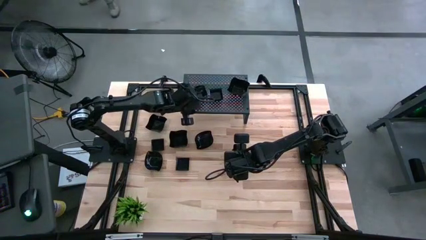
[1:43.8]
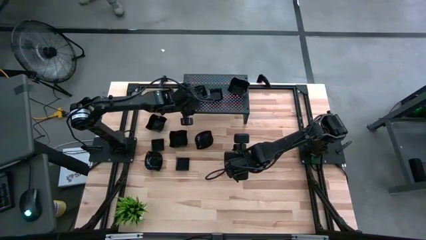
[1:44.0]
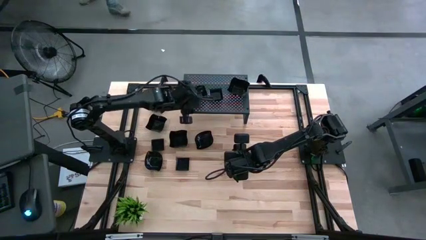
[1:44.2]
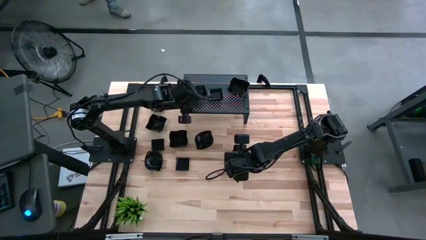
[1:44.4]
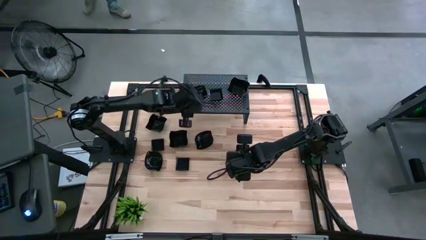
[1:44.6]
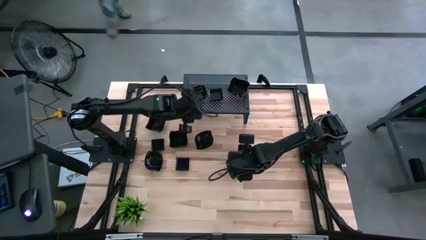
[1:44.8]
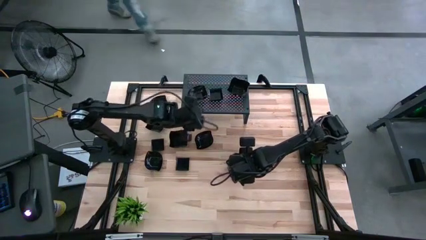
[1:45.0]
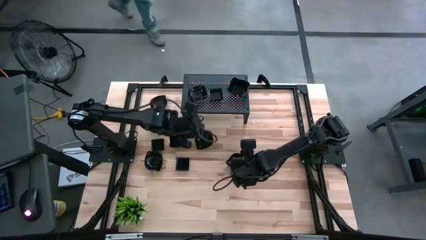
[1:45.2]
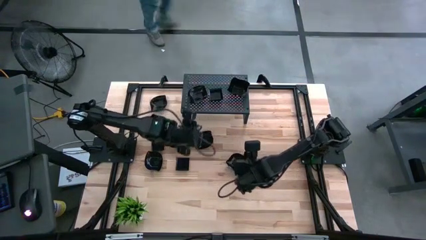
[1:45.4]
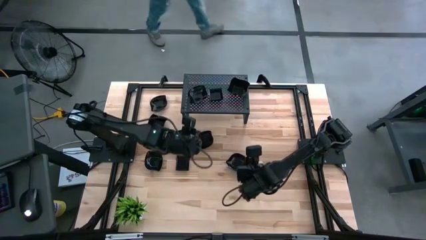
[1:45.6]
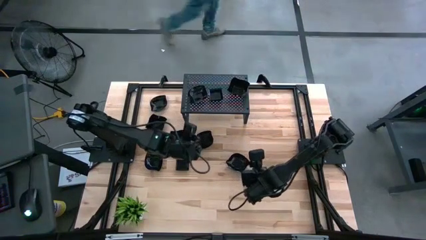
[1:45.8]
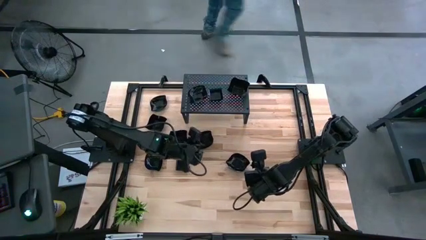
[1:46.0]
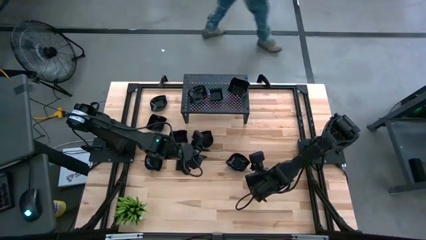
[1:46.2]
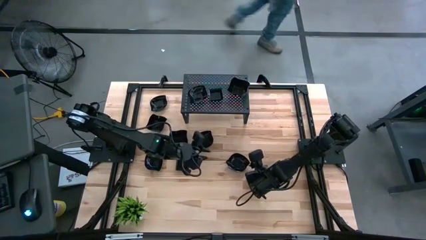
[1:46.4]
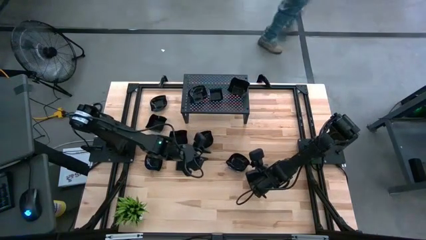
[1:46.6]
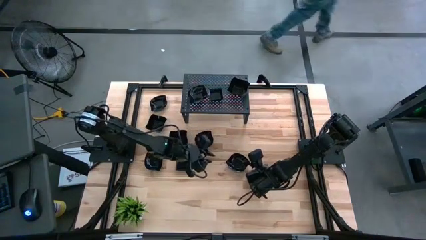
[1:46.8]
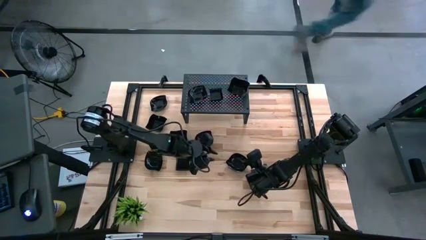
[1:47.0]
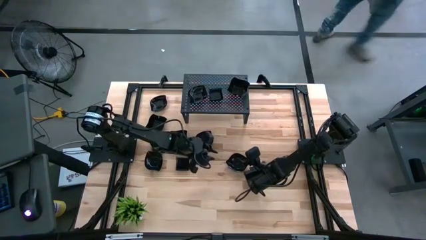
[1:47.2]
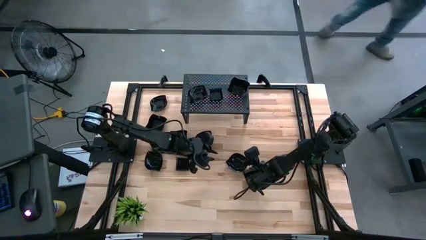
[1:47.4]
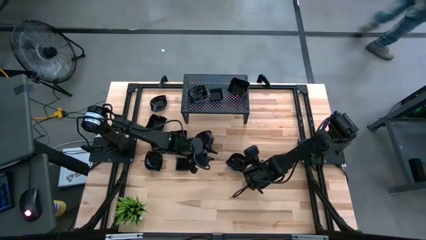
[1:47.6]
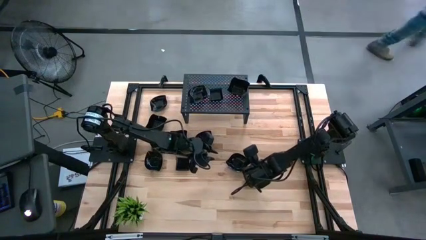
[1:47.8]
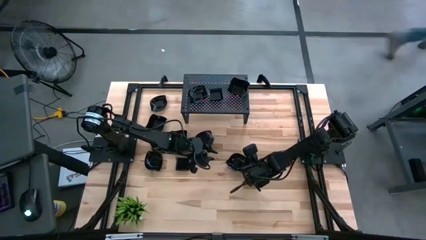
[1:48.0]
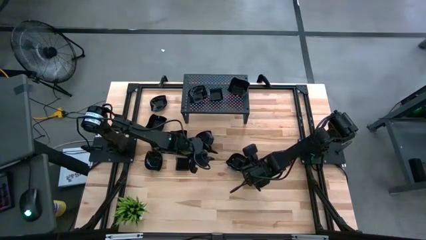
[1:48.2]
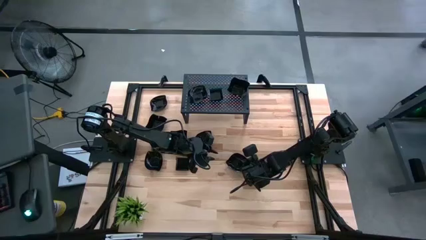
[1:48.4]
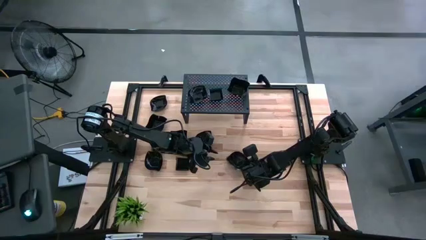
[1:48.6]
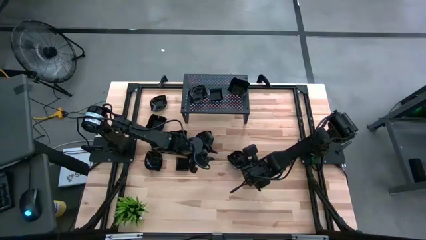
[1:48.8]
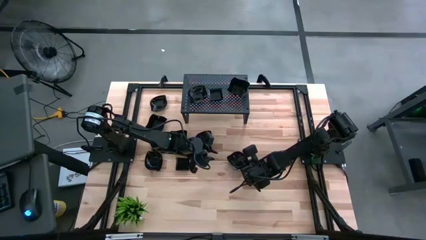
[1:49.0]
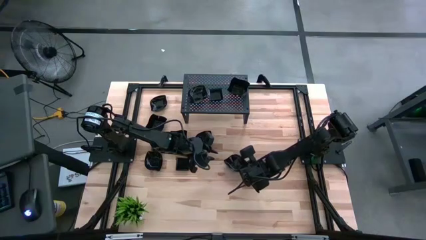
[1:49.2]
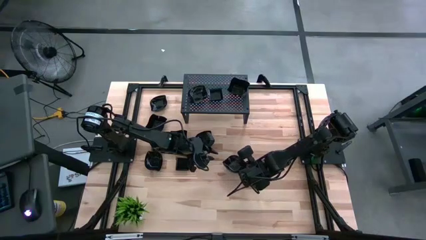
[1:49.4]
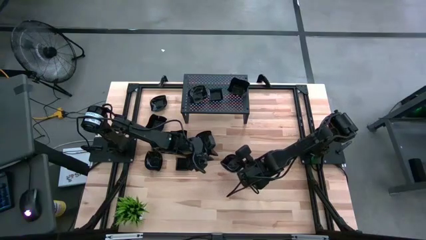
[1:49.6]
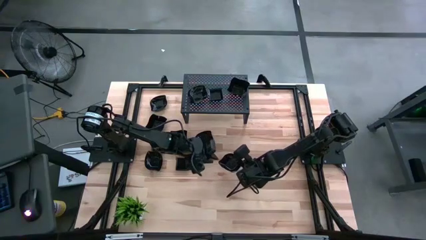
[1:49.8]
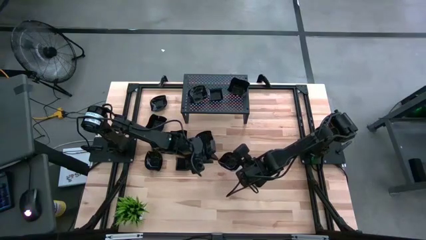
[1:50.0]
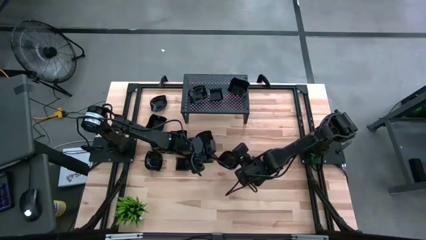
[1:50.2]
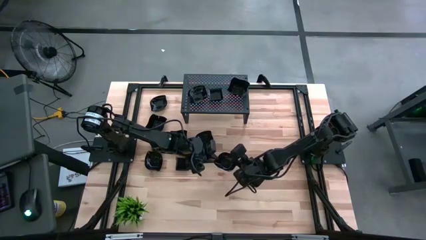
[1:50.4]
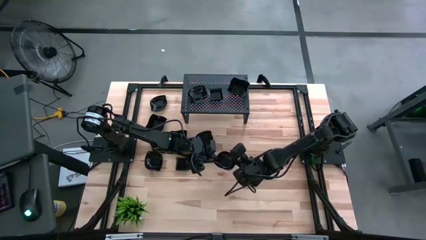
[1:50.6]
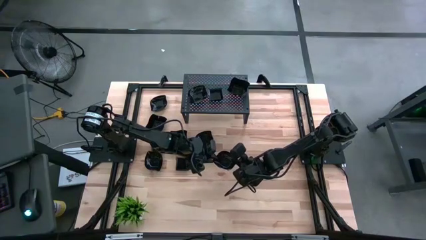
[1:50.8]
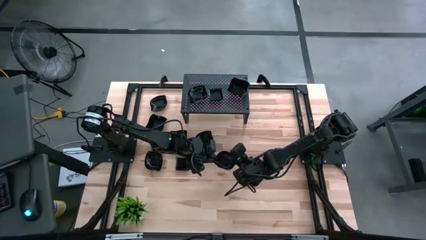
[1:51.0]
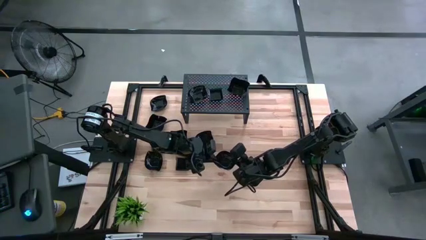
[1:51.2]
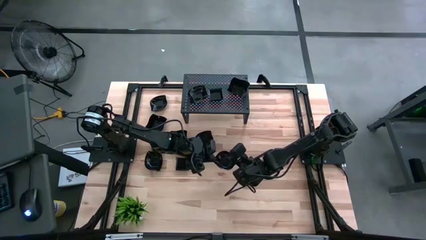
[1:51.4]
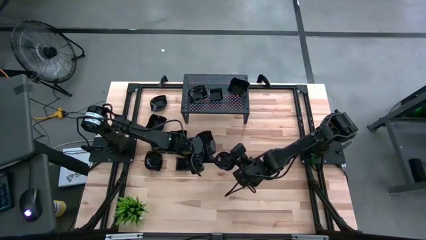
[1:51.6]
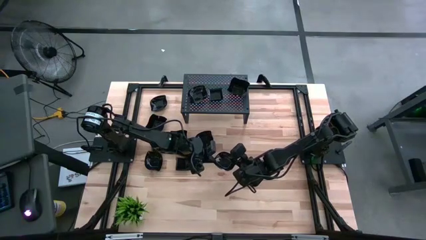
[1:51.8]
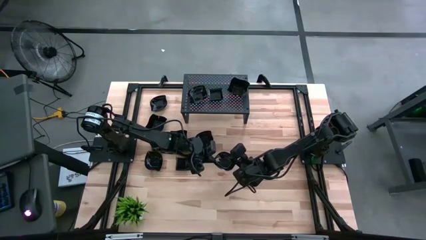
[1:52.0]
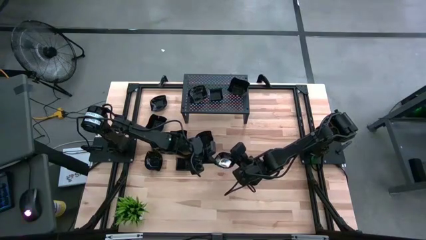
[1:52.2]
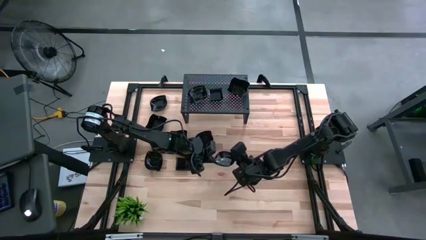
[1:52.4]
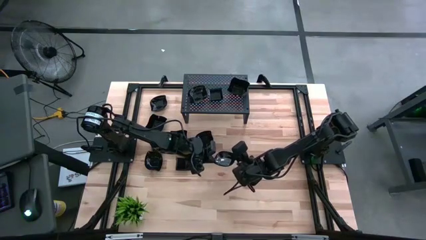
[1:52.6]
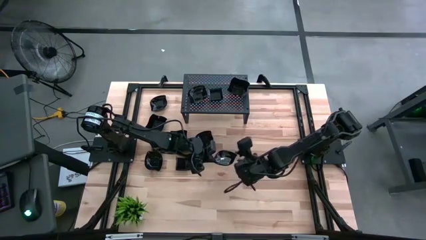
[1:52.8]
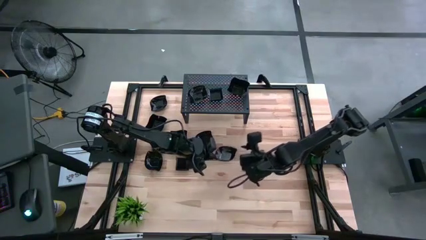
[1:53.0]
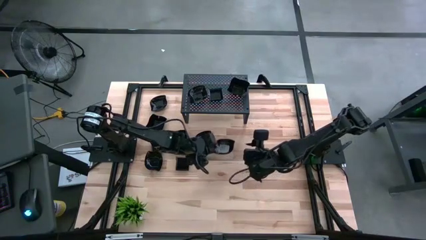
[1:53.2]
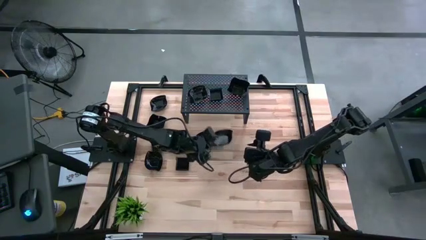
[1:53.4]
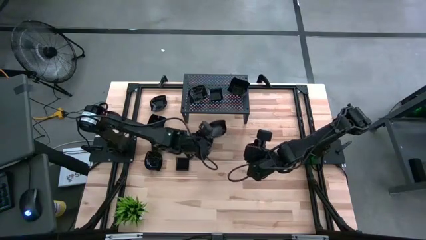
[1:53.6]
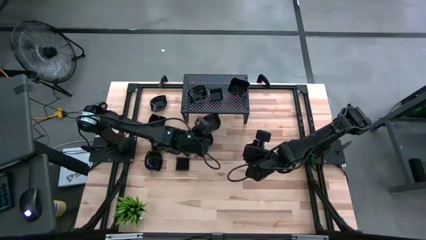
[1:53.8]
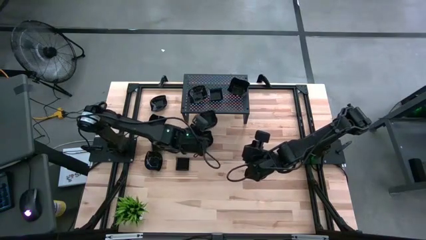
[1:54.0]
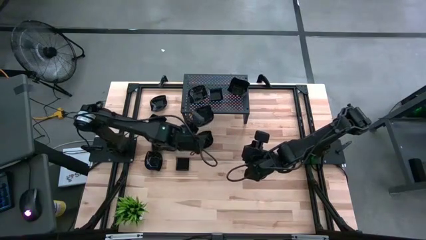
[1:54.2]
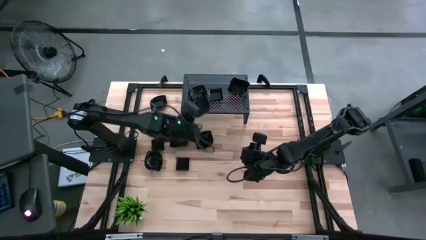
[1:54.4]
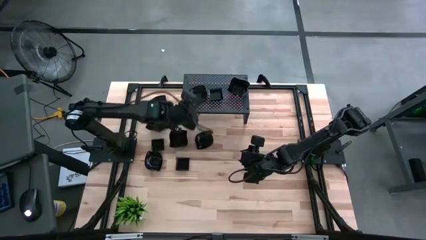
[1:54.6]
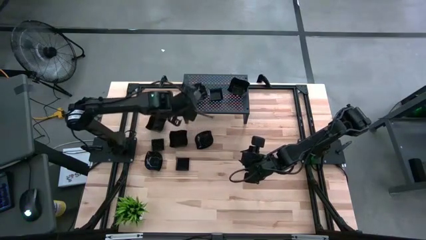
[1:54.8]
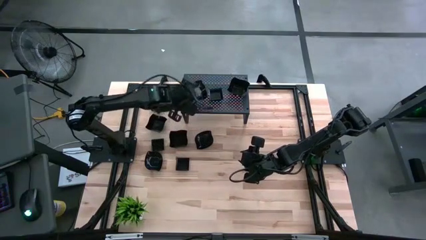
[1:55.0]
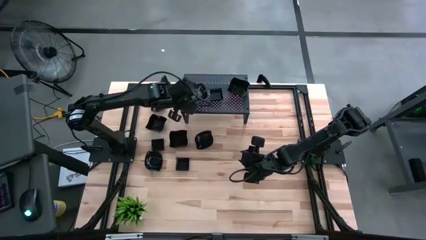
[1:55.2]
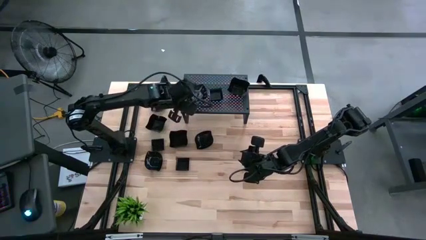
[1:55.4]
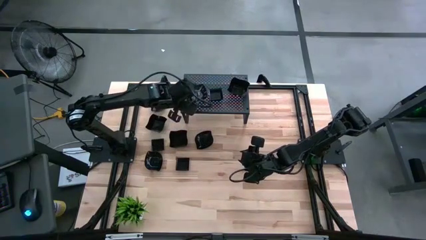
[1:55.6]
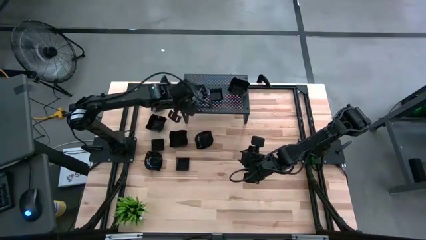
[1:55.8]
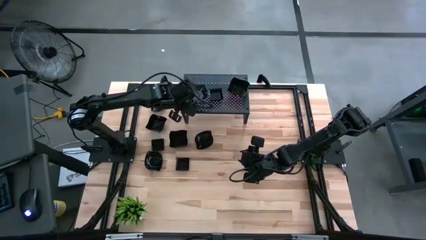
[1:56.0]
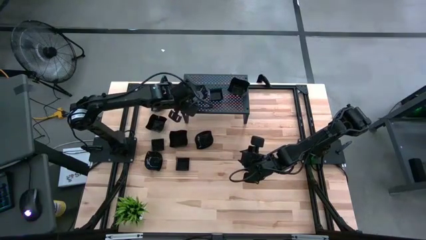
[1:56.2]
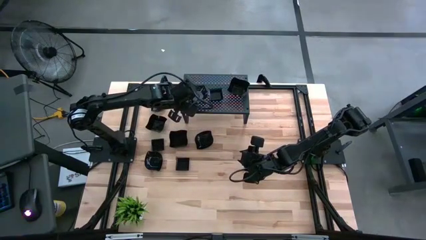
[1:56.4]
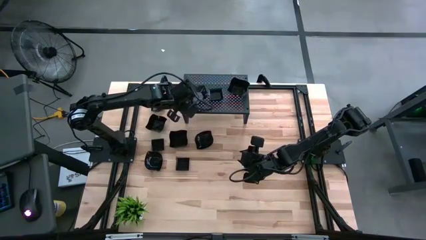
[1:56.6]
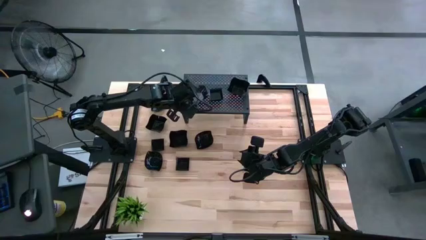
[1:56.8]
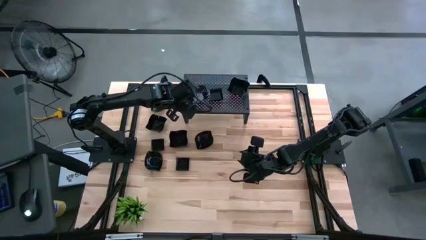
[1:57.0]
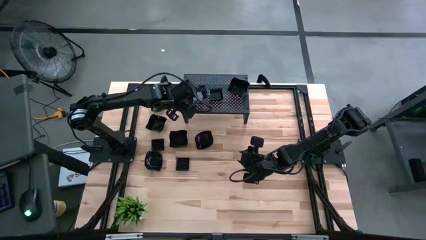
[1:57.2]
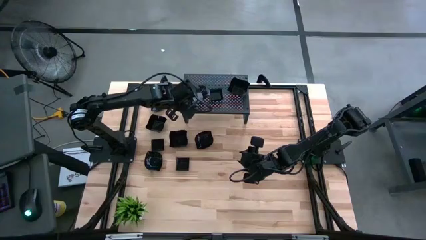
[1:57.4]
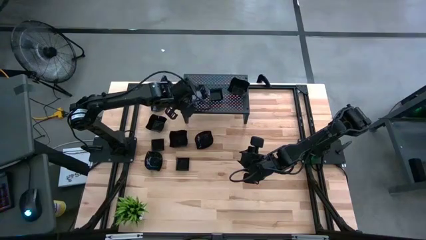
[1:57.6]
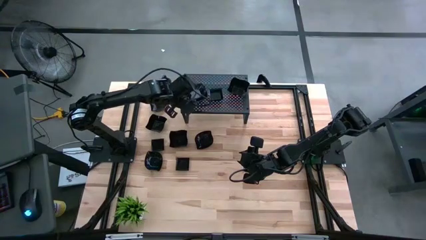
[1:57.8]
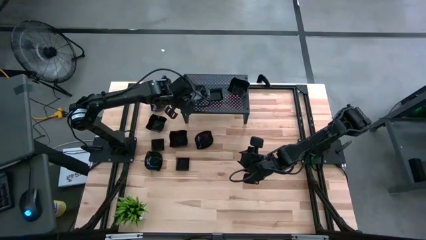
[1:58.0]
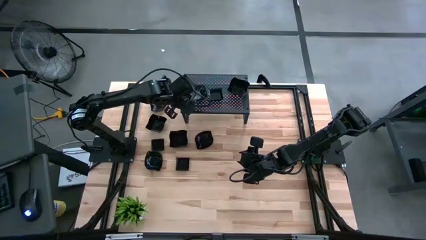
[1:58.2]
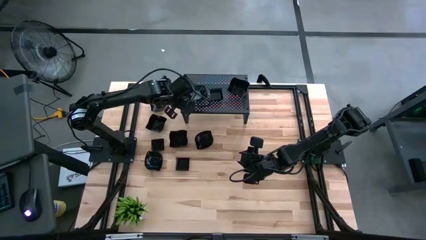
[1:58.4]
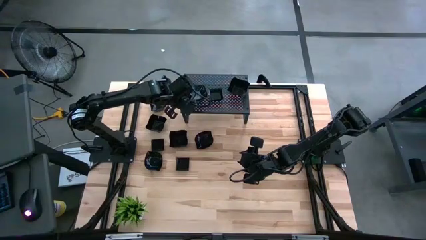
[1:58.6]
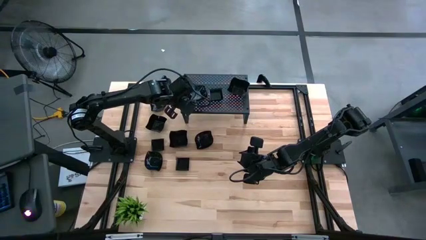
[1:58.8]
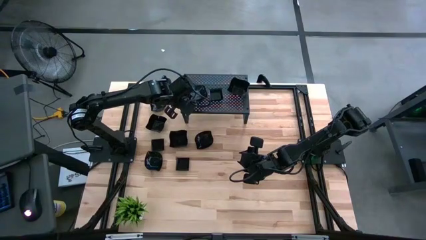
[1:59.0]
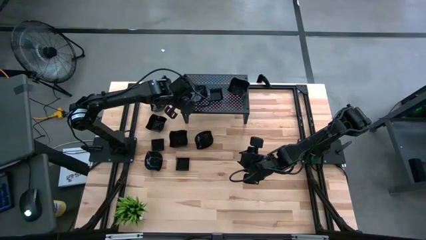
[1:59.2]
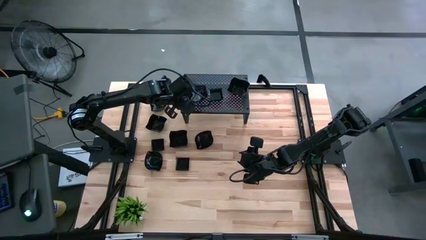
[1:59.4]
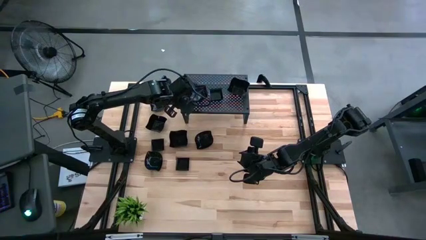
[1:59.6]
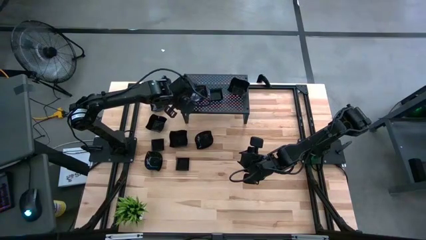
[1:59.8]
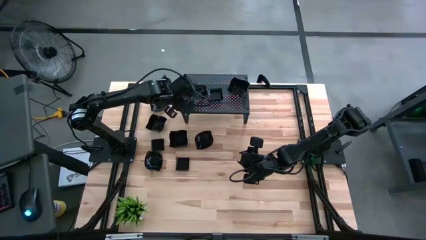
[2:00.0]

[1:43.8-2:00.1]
Task: Pick & Place Mini shaped plates
Stack the black leaf-shaped plate on top of the black leaf-shaped plate on the shelf
